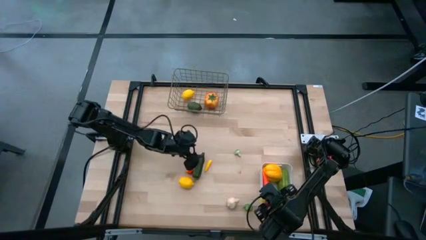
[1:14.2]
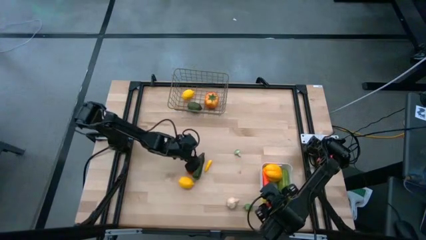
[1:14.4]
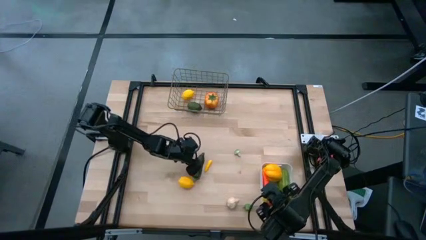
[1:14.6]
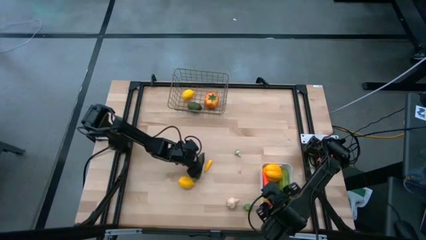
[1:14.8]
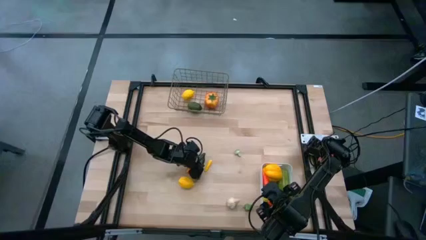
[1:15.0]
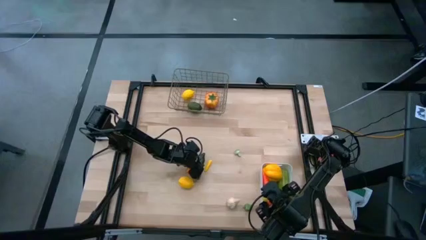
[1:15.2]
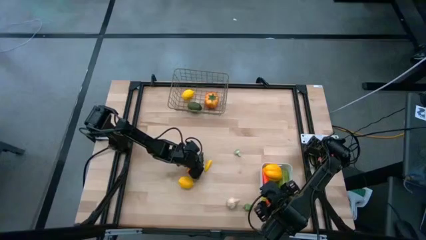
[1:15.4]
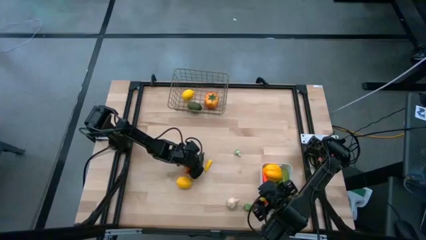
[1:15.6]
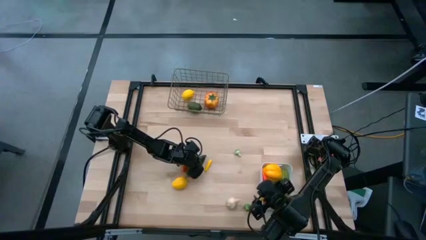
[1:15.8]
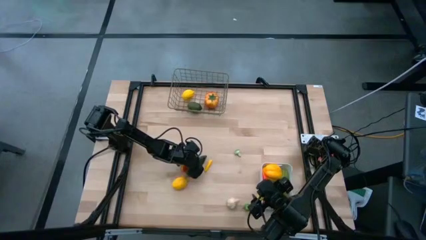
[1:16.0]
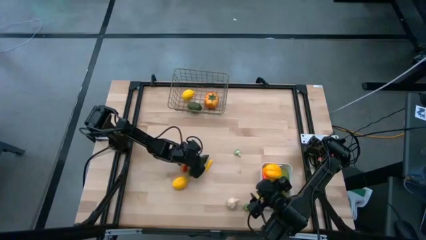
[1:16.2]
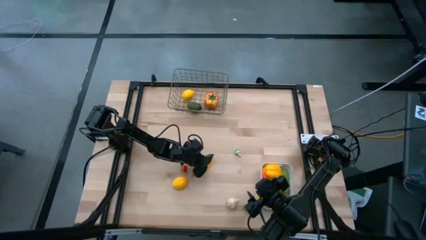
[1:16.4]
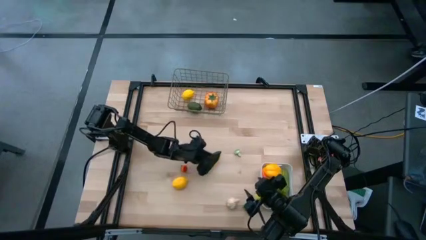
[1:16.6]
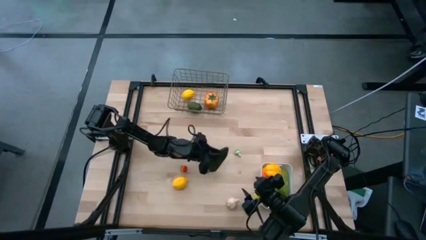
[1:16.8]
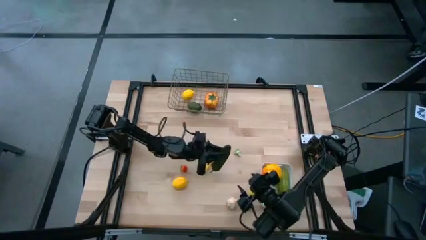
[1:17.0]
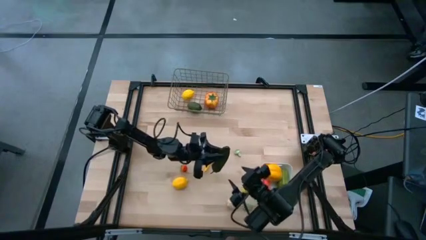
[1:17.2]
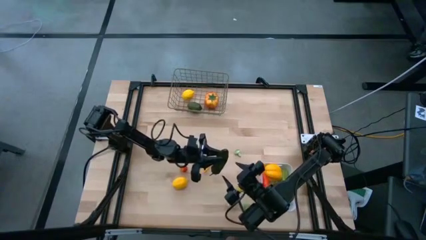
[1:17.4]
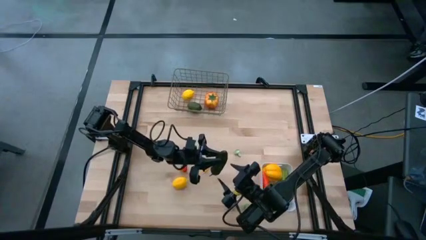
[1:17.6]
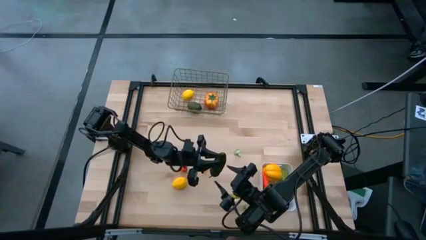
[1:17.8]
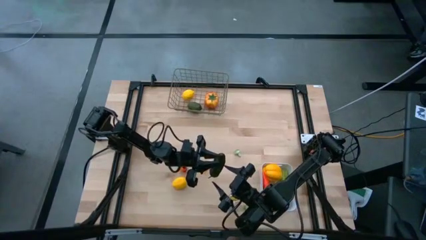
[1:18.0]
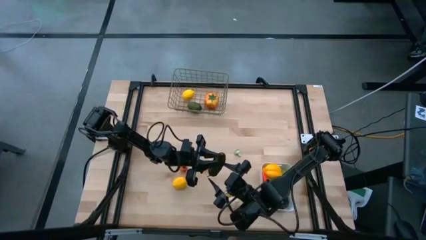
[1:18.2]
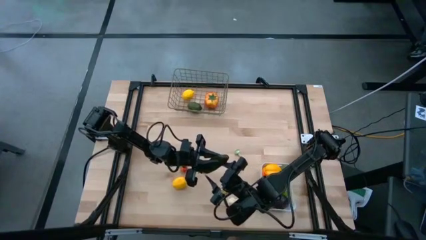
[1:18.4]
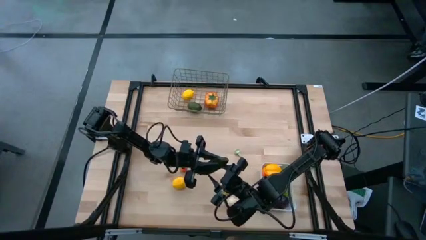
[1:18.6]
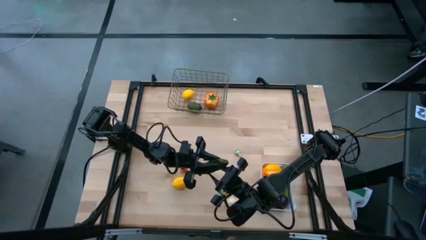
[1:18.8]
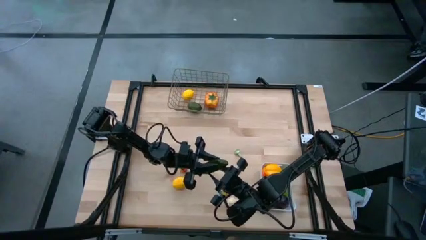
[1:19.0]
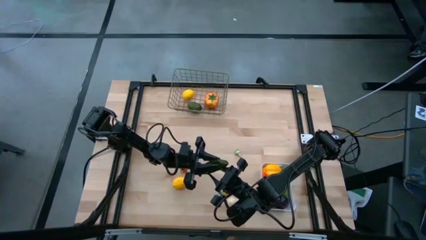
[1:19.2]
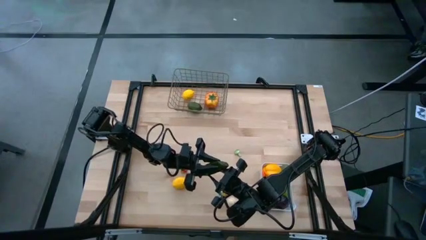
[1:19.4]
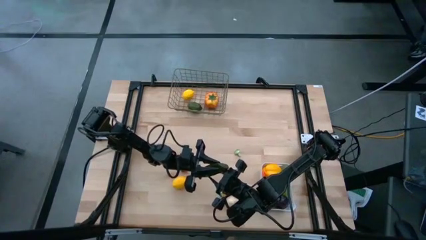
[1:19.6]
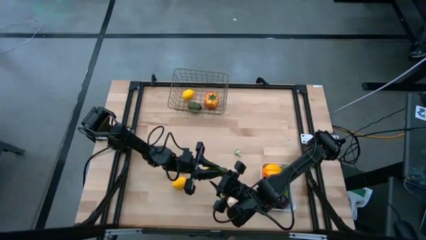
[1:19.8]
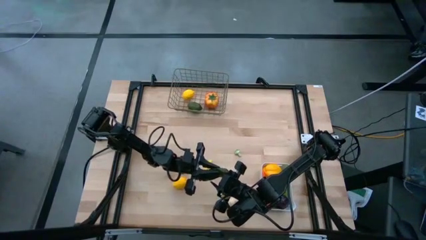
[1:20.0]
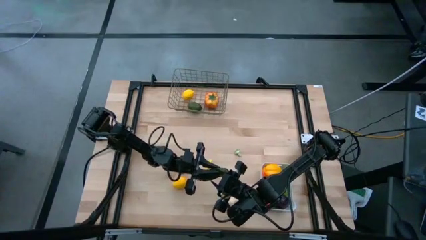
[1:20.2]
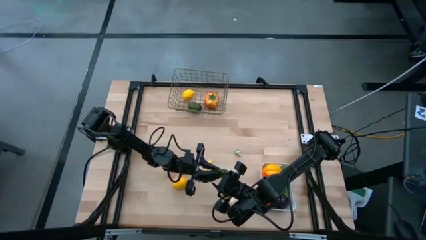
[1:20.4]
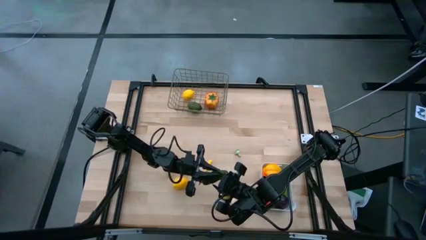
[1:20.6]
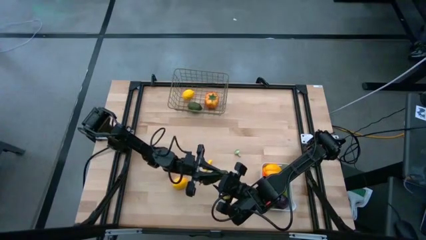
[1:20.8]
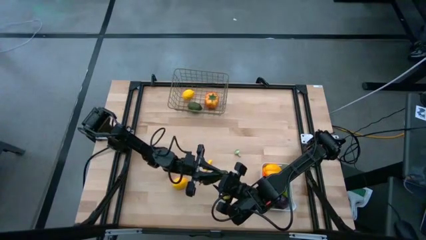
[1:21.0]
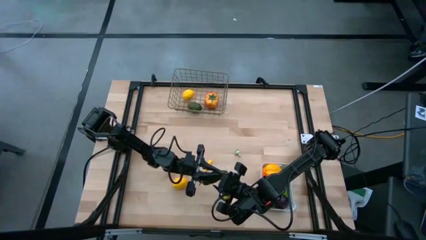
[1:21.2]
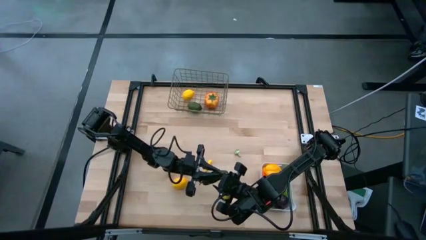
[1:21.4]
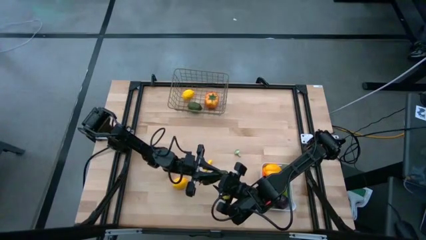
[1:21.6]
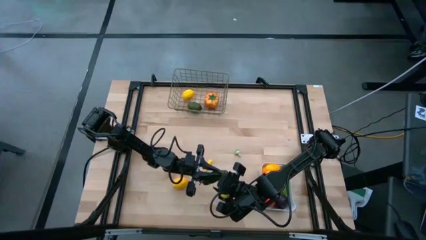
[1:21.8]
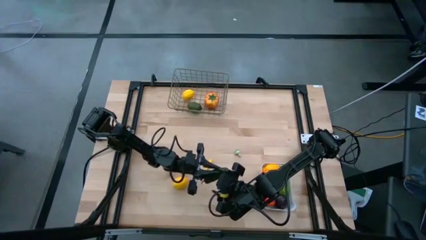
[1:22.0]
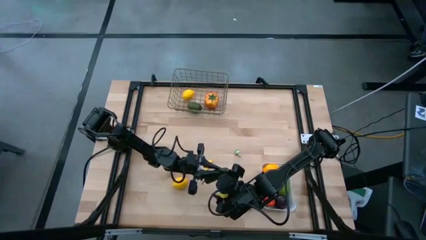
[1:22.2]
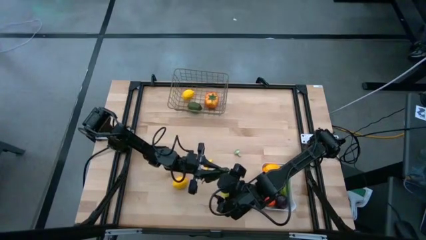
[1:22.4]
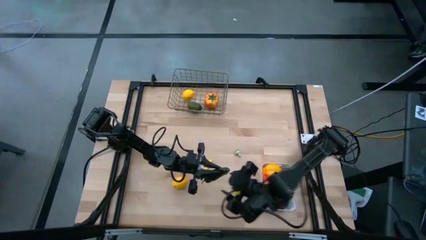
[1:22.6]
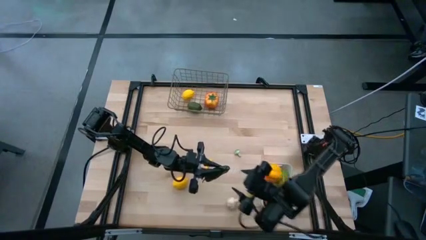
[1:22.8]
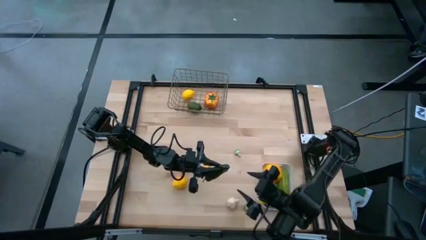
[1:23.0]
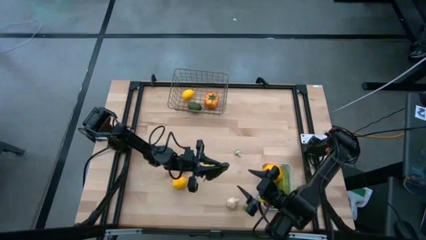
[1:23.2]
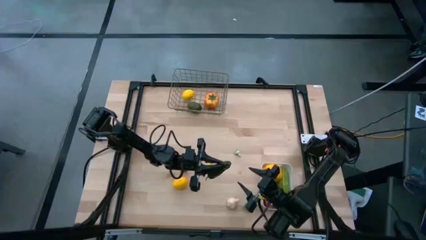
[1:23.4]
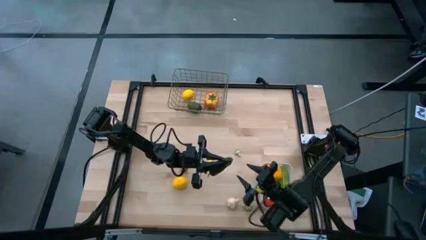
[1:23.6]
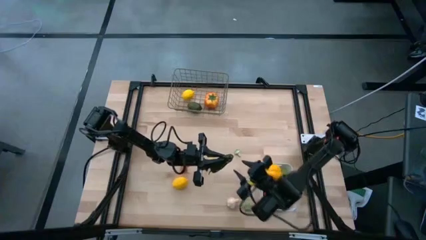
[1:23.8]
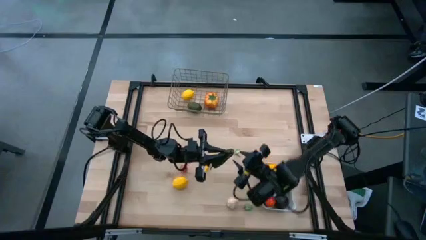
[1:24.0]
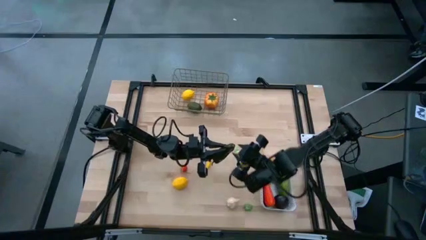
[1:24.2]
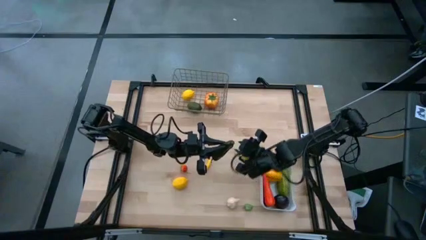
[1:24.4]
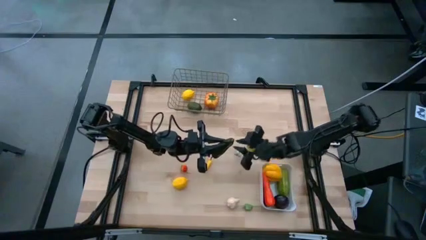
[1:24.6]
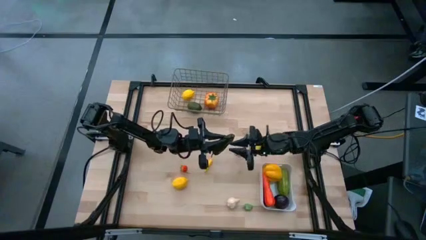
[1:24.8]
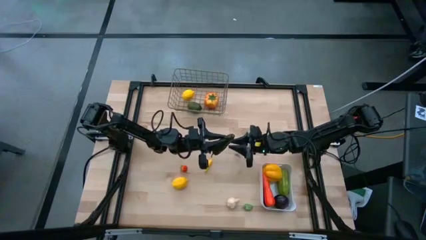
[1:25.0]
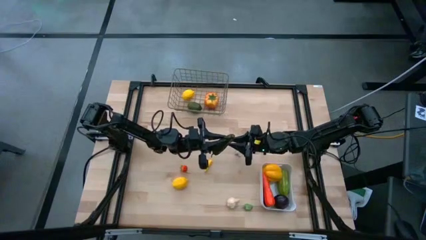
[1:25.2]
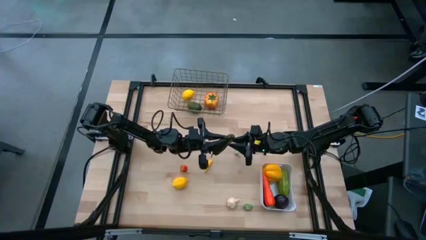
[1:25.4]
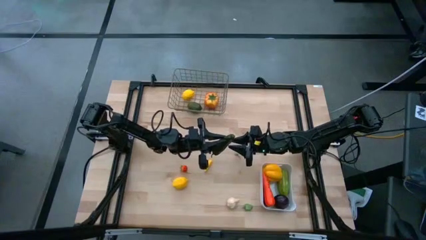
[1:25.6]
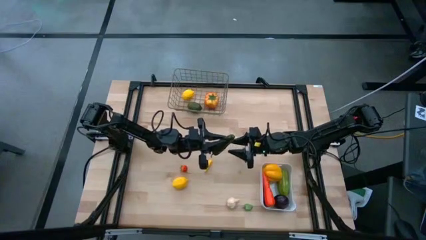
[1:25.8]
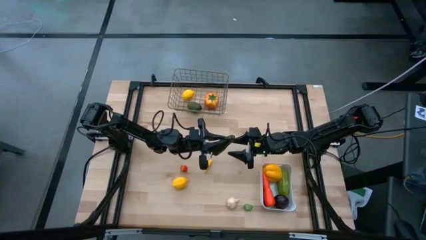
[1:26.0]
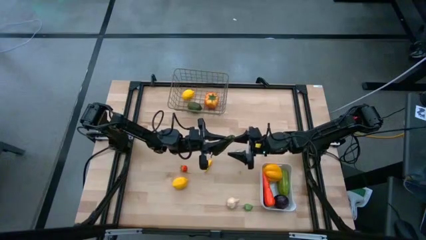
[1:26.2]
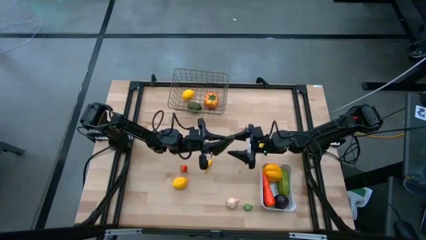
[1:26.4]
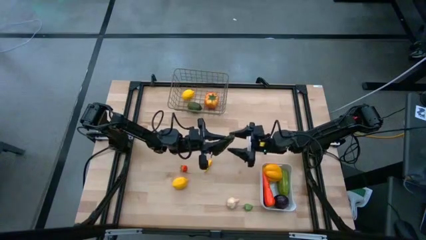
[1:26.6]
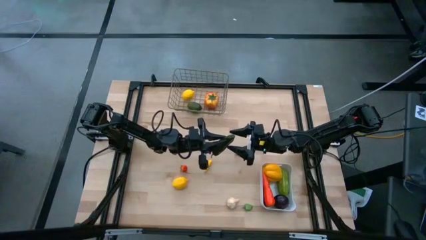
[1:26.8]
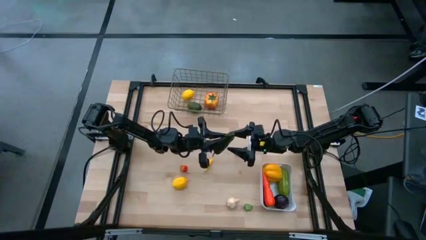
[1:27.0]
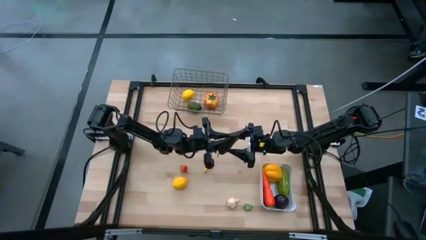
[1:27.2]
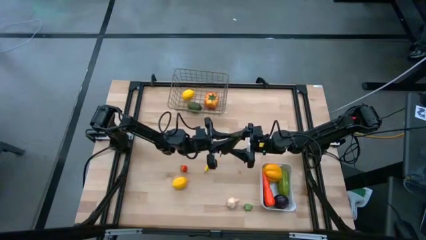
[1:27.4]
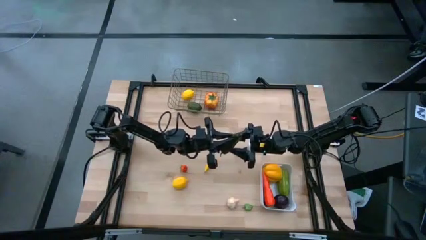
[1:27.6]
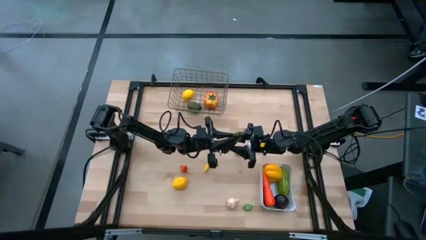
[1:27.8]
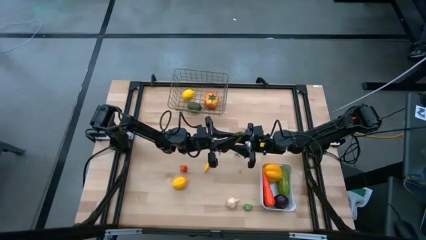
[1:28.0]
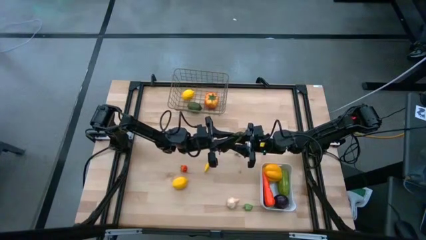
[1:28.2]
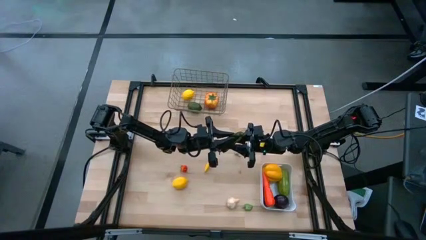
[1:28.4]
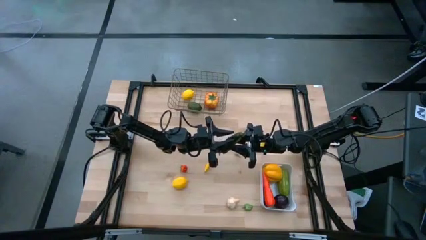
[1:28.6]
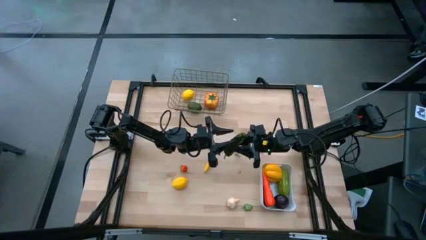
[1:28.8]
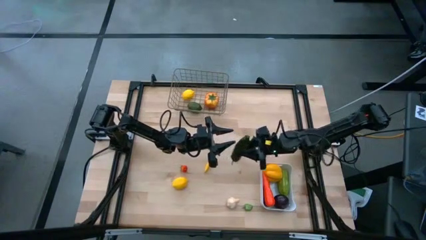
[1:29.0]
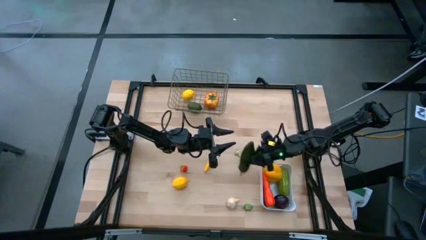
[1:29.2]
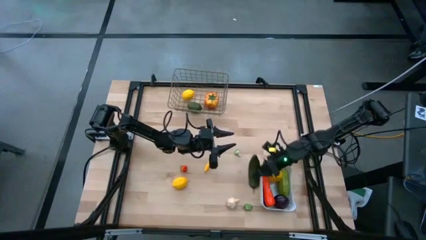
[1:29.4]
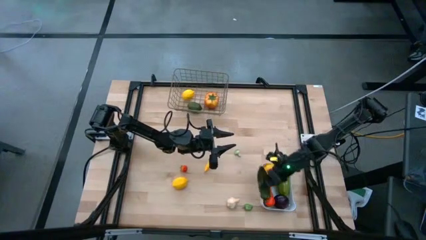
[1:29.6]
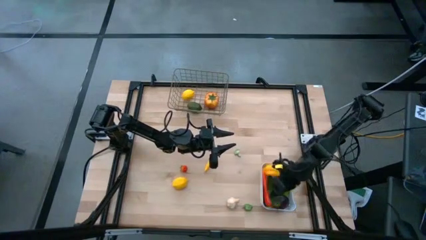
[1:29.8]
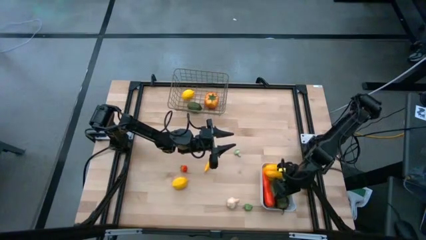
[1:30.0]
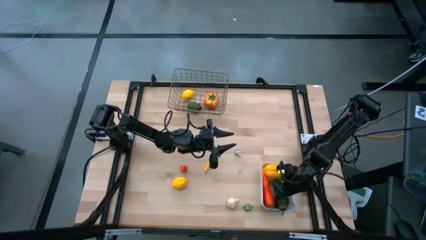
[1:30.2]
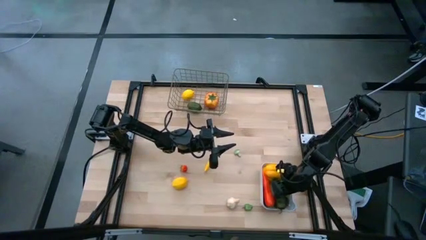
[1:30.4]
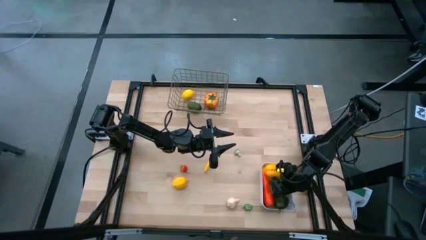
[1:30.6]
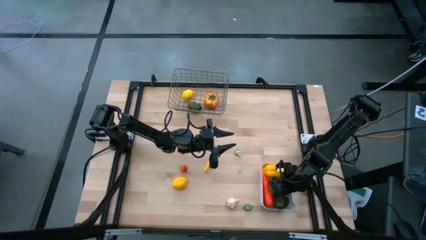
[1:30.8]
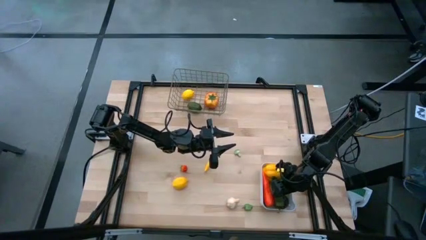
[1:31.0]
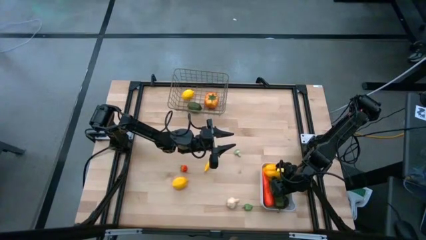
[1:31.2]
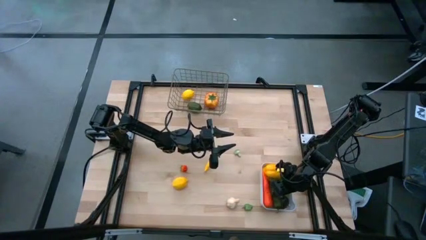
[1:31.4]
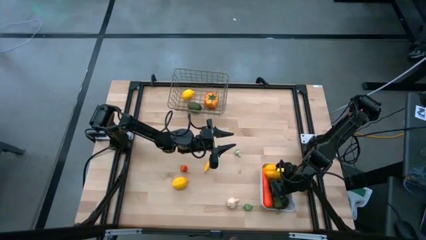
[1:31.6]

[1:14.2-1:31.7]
Task: Sort produce into baskets
Put the cucumber into the white bin
